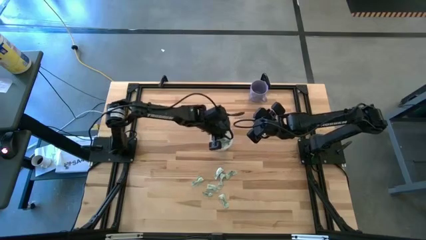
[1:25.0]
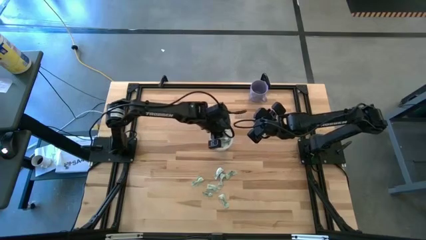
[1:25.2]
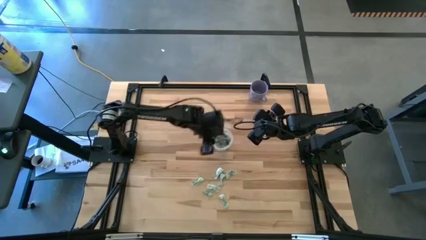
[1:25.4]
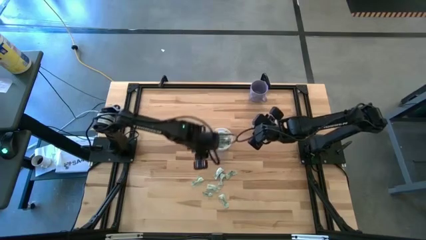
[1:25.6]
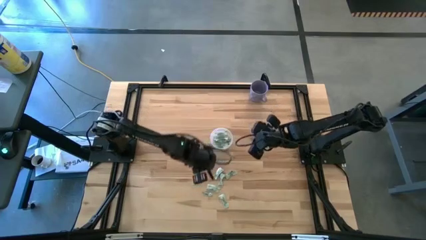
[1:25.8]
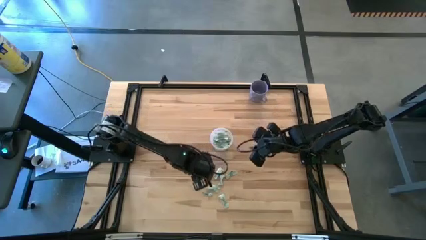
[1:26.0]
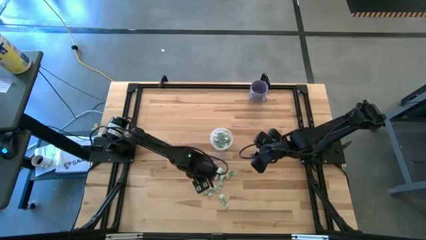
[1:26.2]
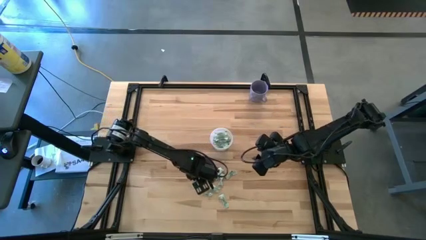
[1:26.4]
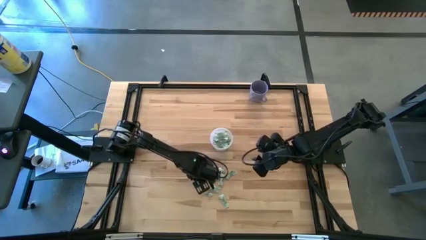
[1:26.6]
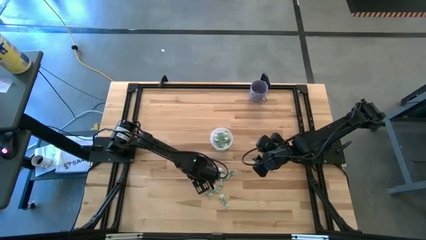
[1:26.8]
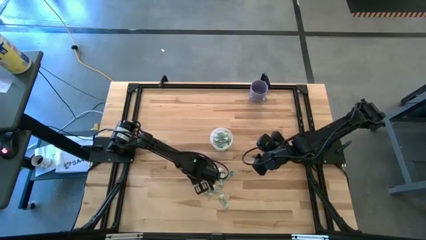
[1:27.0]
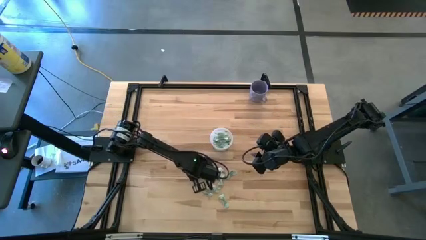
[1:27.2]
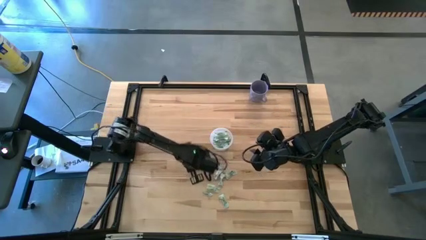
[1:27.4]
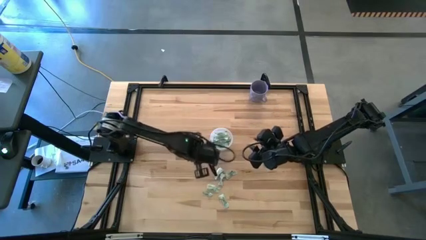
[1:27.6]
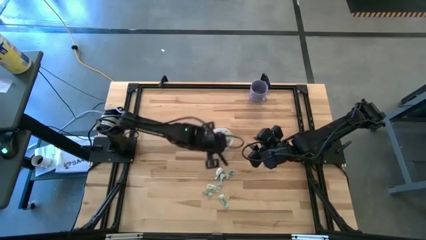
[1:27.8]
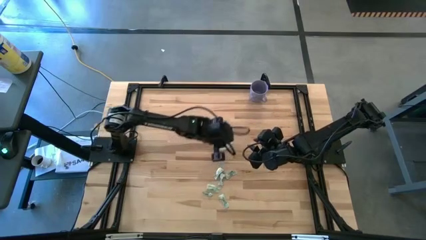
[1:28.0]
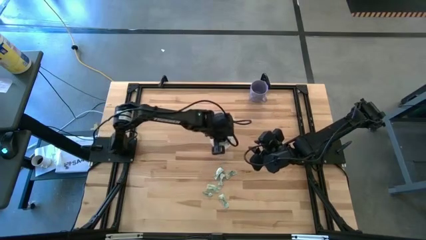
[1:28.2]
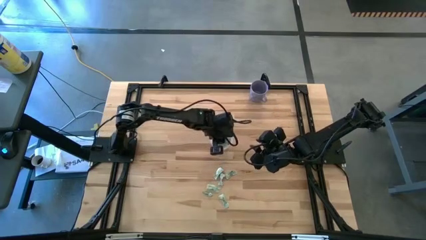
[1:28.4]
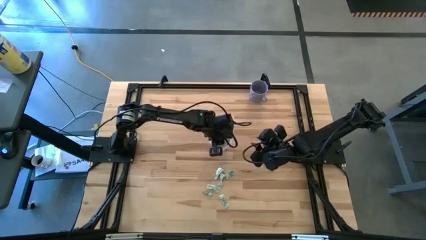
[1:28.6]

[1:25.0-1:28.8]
Task: Pick and place Stevia / Truvia into bins
Put the green stevia packet into the transparent container

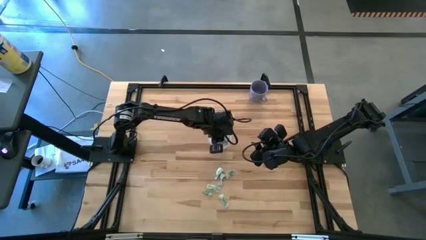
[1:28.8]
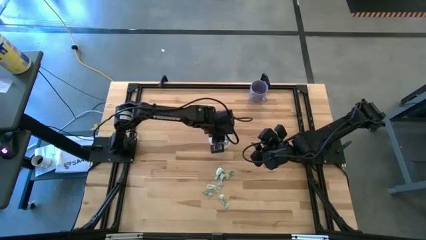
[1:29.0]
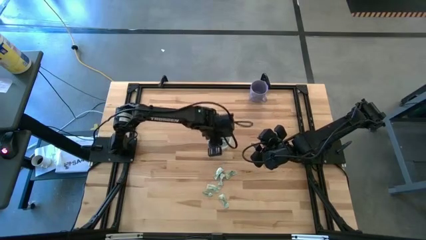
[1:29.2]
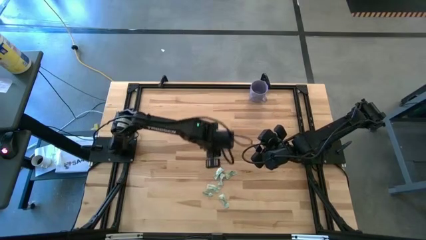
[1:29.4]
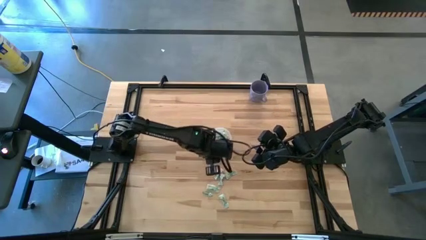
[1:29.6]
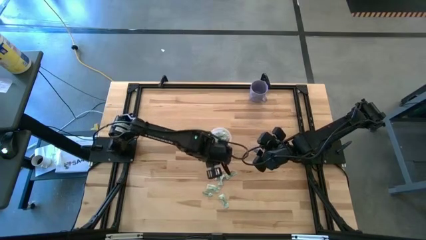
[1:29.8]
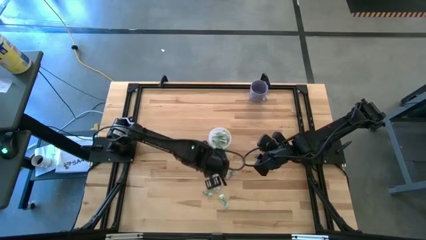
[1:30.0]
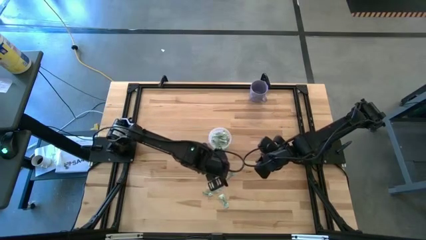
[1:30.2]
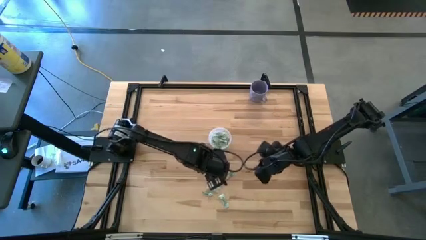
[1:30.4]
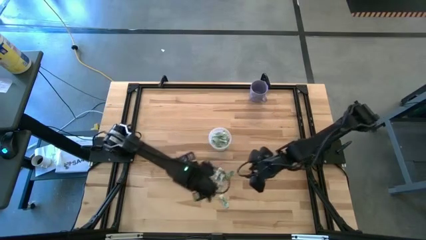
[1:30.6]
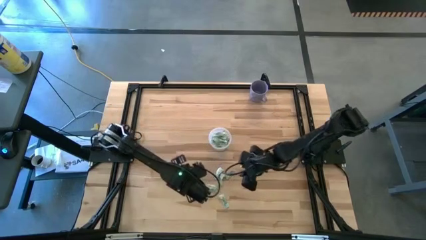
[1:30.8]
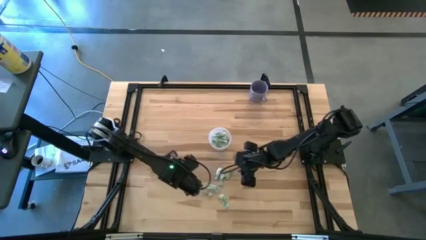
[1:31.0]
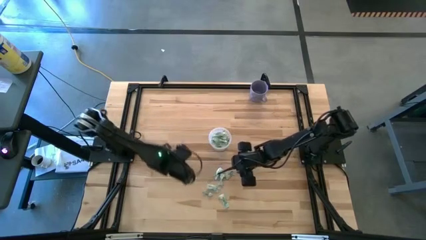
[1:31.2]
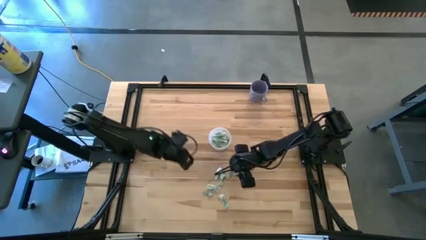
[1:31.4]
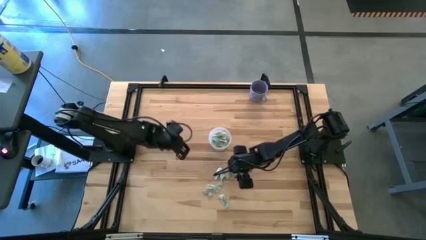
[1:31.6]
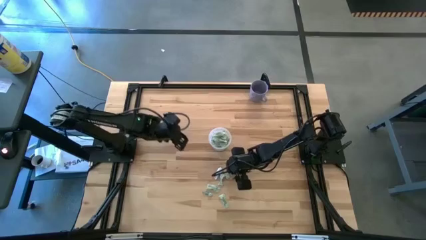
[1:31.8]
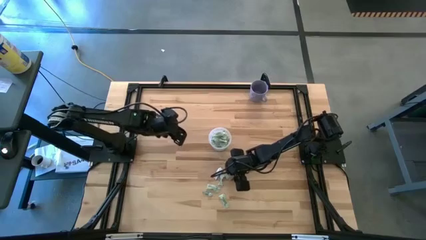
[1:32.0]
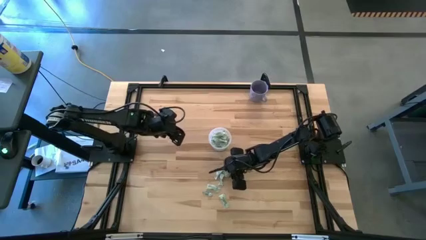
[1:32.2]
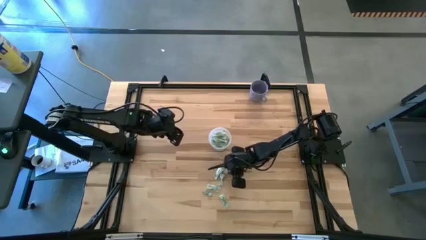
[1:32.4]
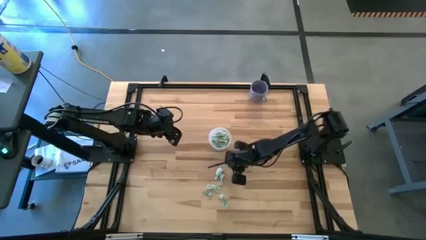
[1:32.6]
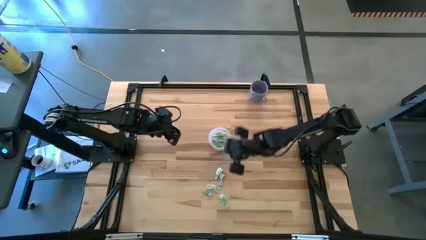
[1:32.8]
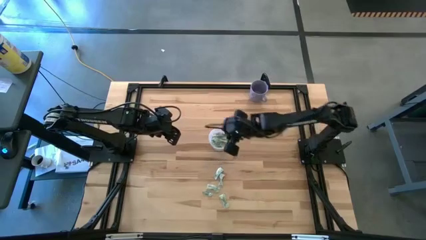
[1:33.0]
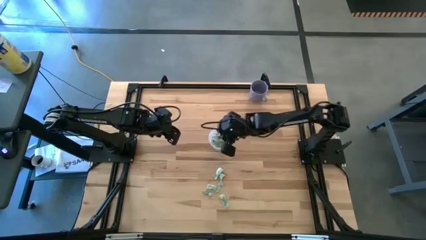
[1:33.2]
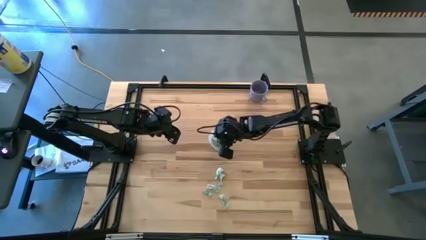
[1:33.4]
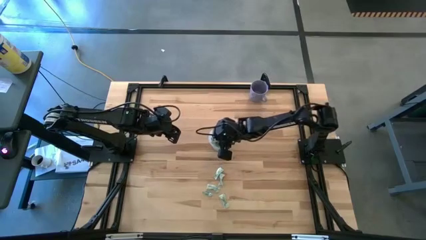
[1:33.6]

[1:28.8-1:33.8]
Put the green stevia packet into the transparent container

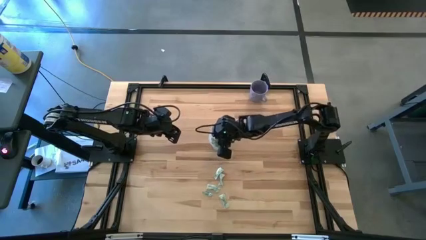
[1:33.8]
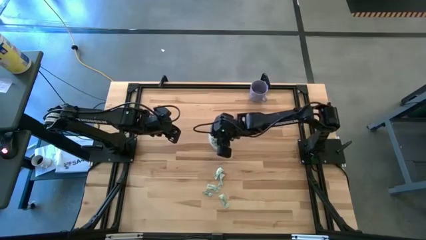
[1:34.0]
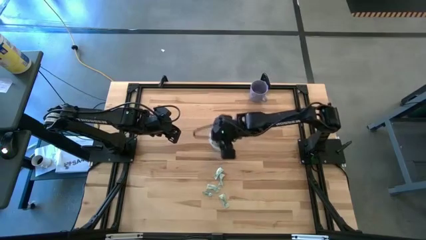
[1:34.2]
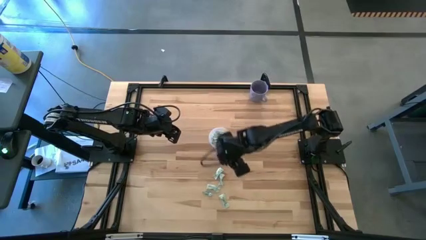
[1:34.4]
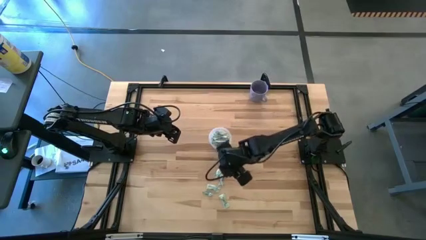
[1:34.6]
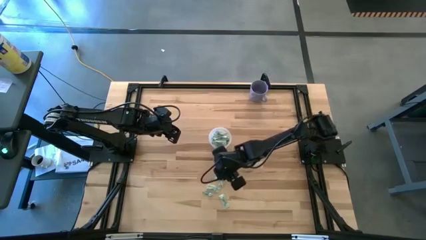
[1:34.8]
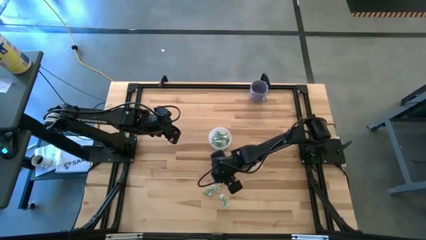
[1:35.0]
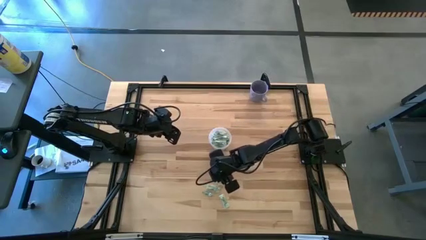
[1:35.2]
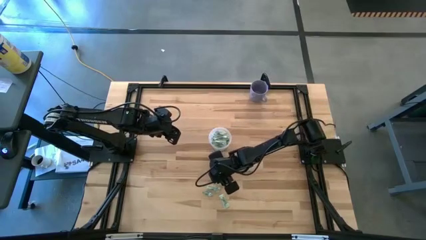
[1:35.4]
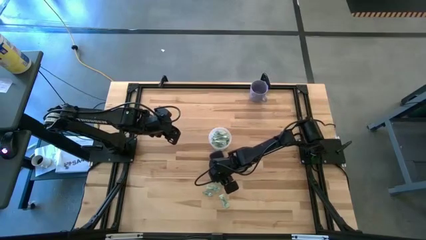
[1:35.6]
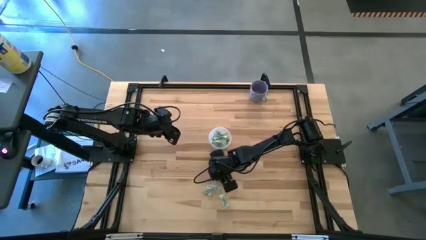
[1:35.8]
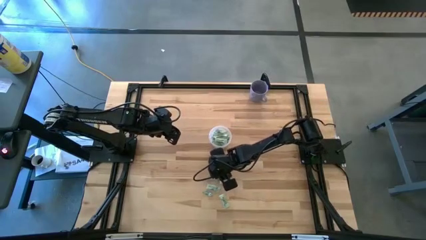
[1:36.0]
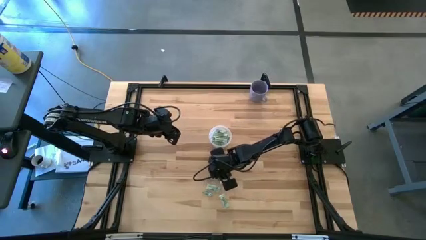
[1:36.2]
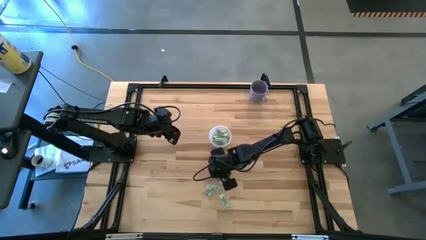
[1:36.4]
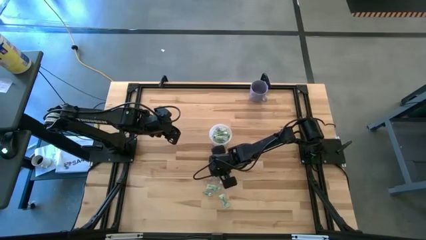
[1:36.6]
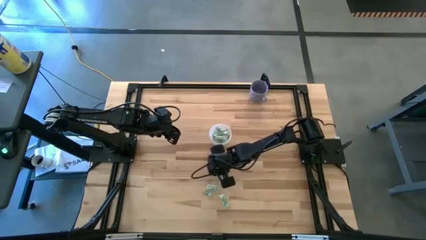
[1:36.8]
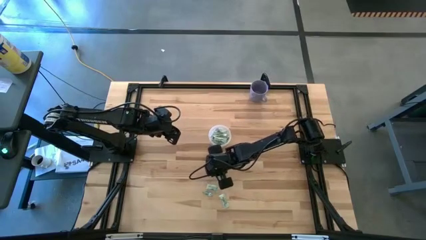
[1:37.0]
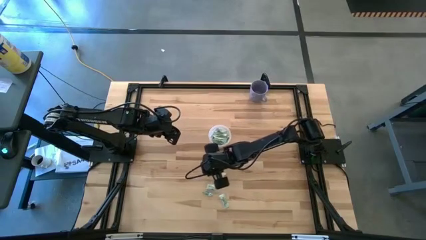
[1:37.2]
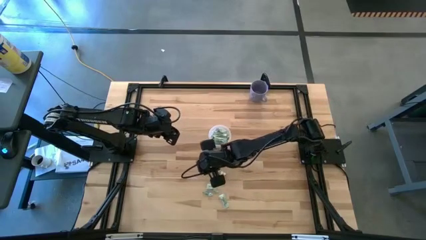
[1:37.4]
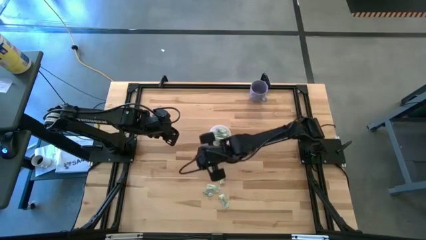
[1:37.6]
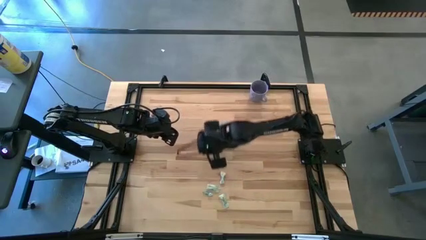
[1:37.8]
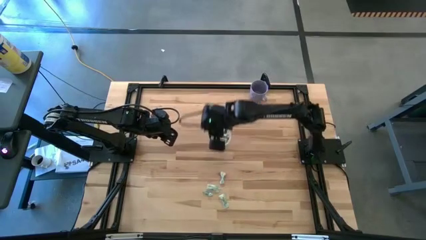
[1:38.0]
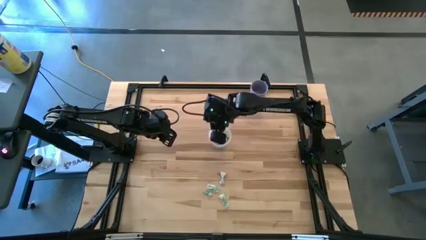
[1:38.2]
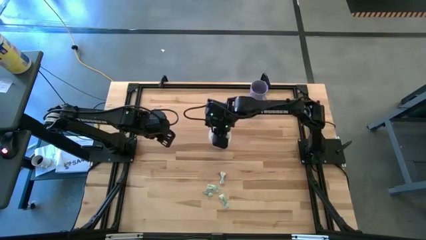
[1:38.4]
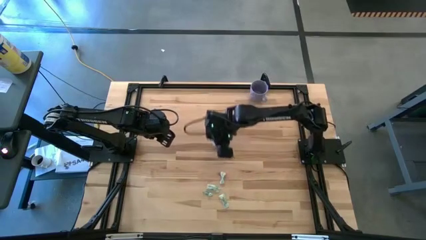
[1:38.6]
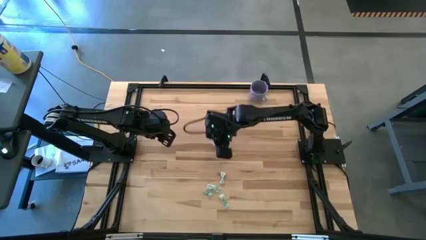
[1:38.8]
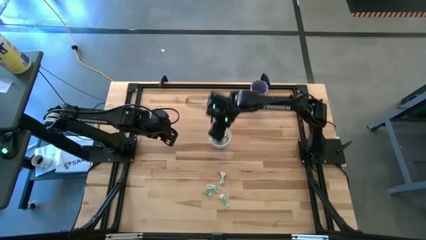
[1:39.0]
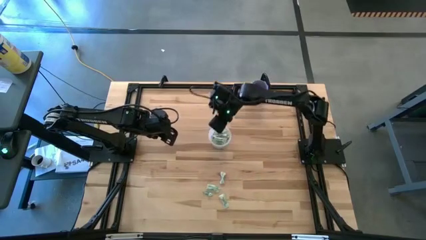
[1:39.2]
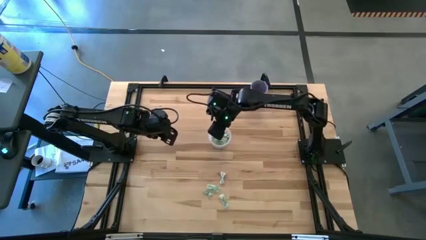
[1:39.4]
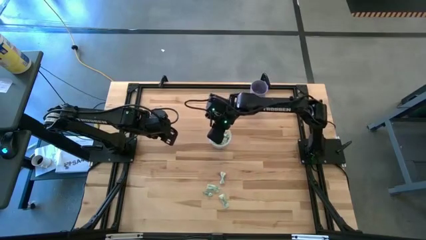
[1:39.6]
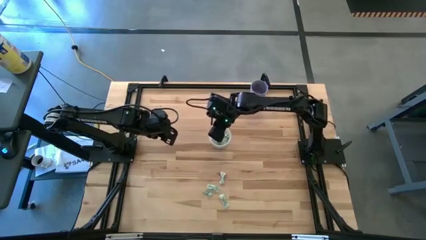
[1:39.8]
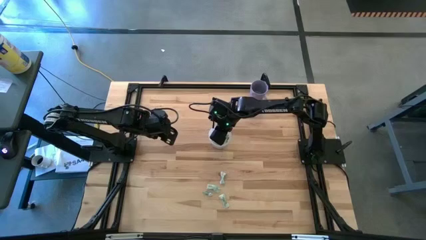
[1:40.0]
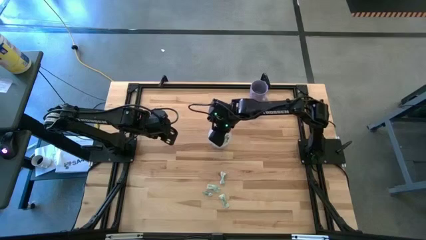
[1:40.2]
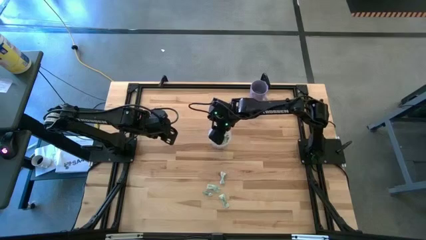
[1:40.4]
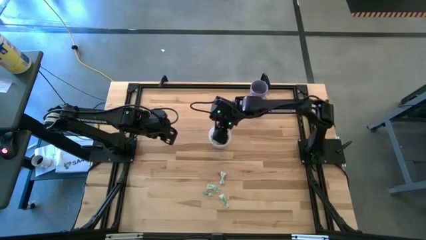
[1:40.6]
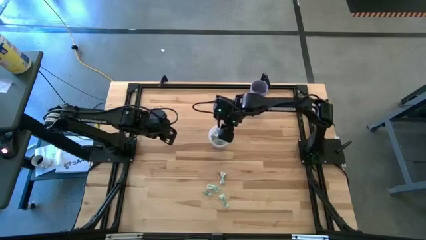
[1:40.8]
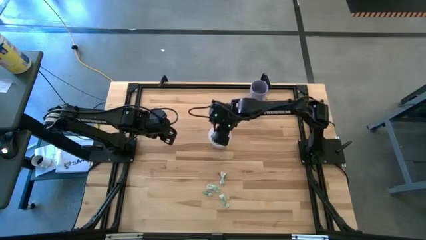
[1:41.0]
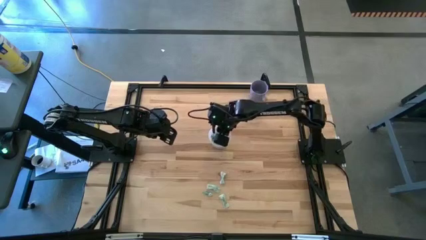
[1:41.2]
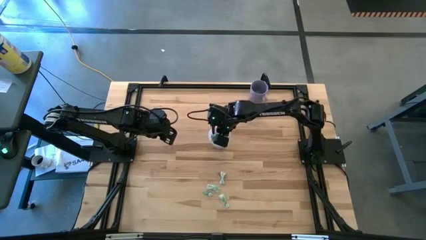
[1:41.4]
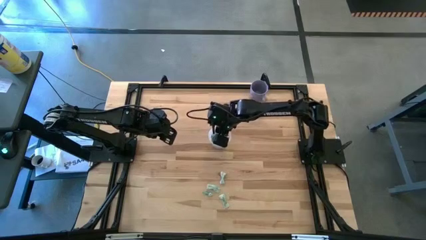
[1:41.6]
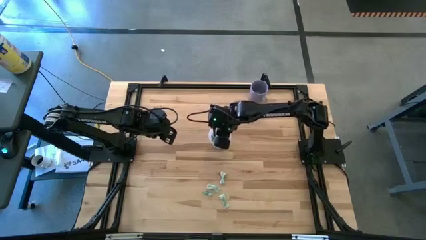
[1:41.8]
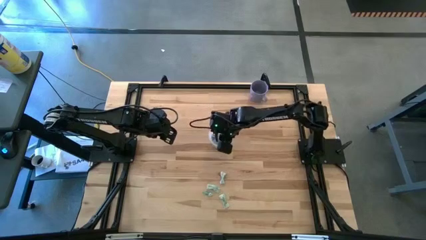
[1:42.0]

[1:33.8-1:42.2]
Put the green stevia packet into the transparent container
